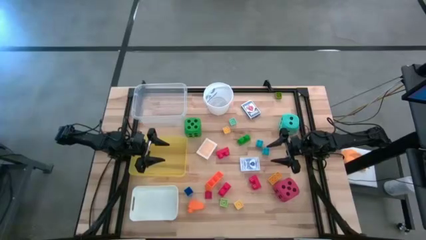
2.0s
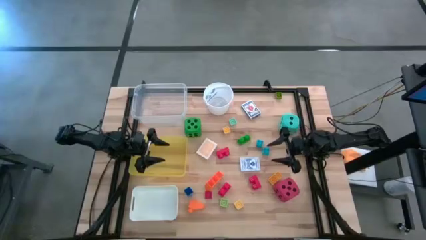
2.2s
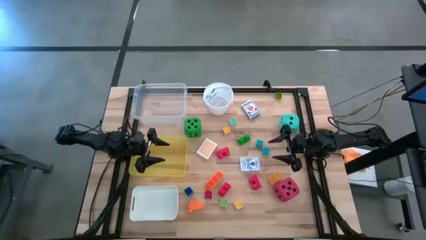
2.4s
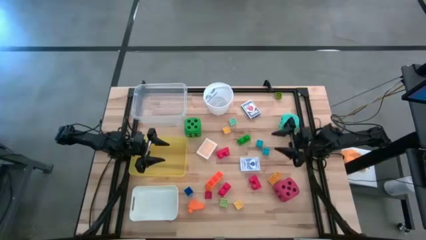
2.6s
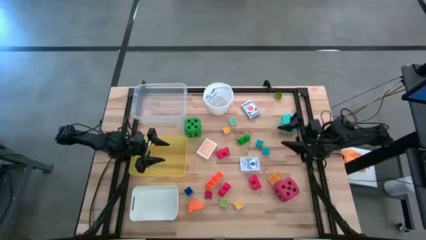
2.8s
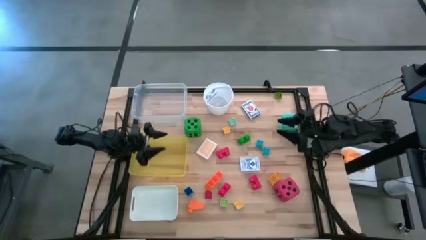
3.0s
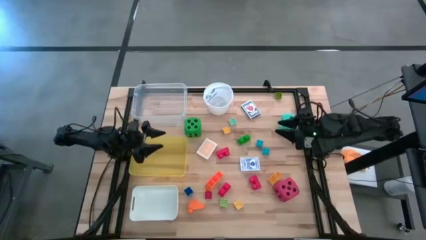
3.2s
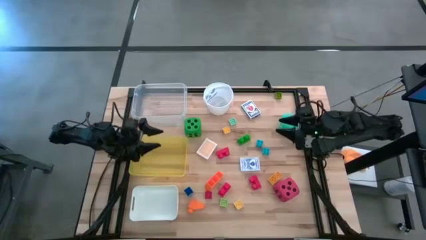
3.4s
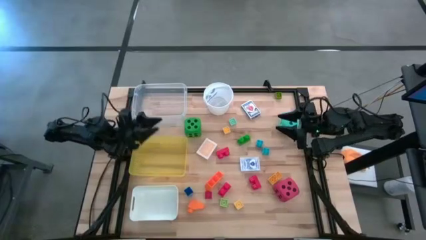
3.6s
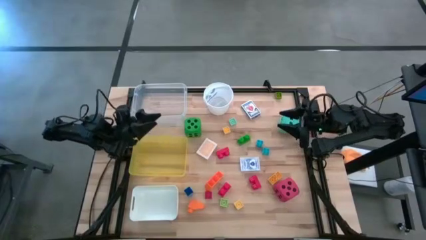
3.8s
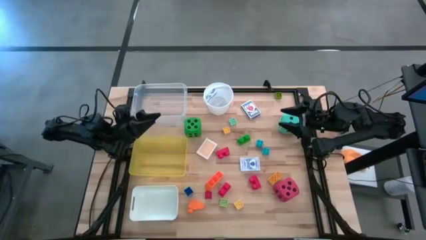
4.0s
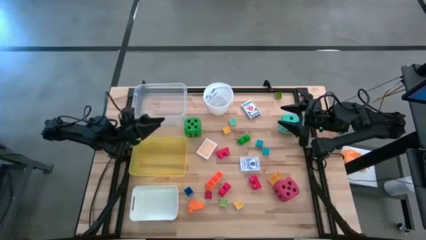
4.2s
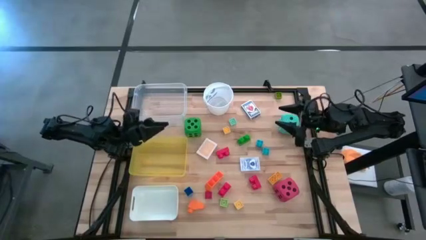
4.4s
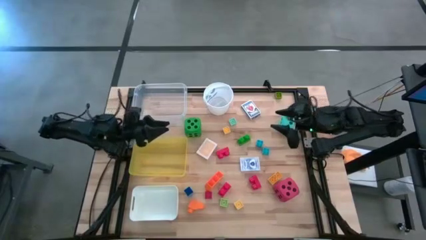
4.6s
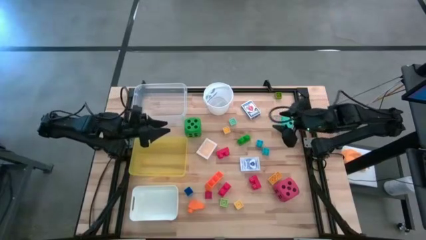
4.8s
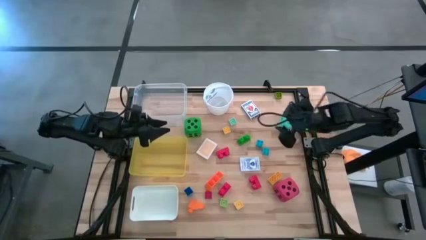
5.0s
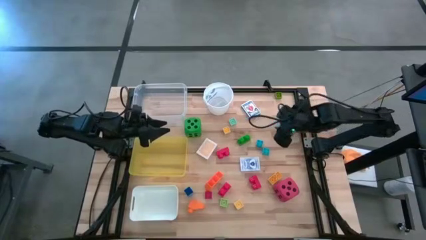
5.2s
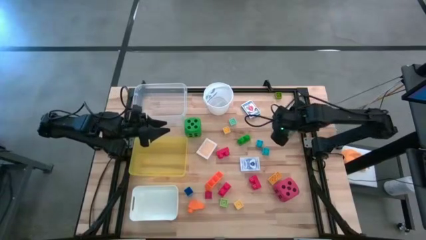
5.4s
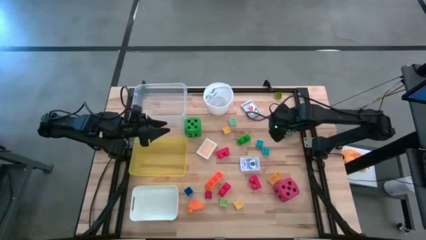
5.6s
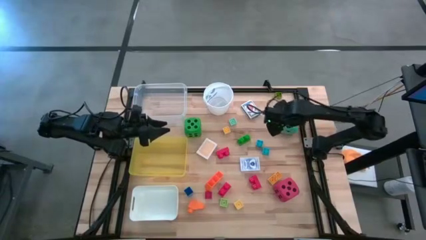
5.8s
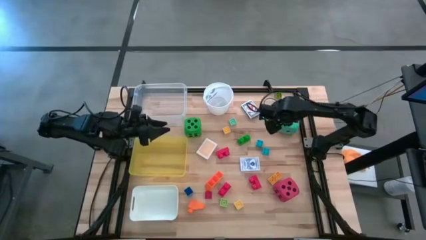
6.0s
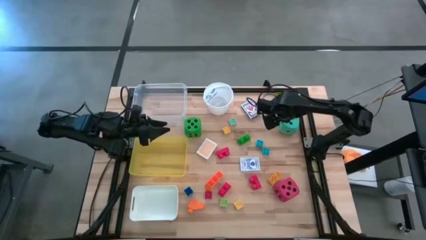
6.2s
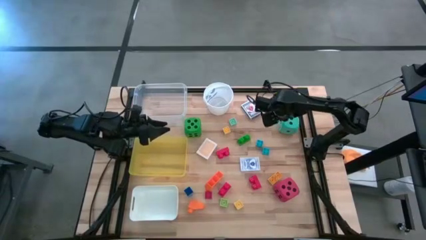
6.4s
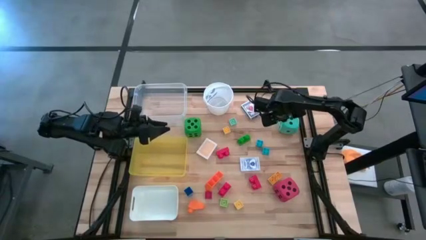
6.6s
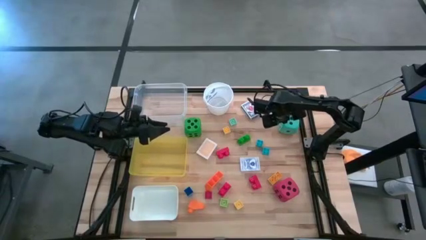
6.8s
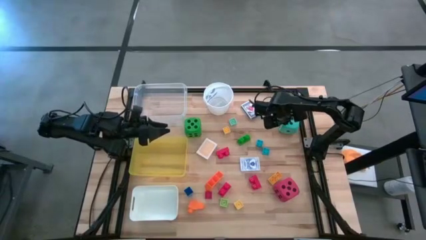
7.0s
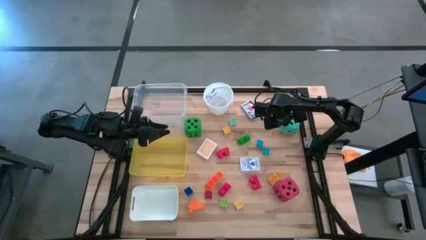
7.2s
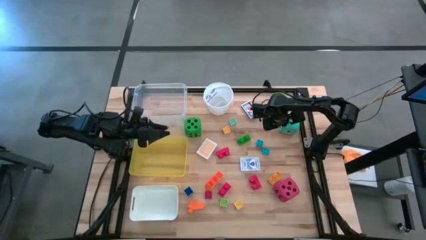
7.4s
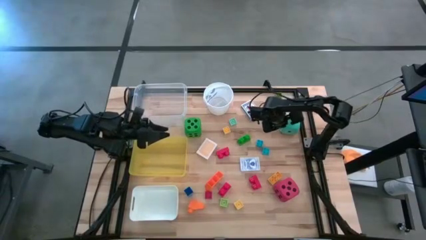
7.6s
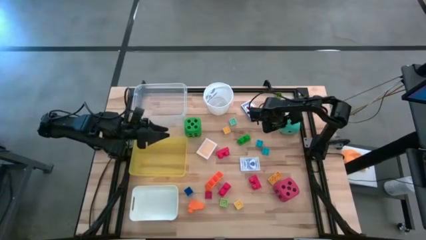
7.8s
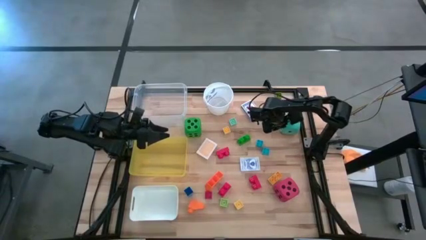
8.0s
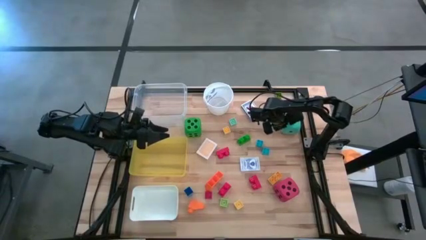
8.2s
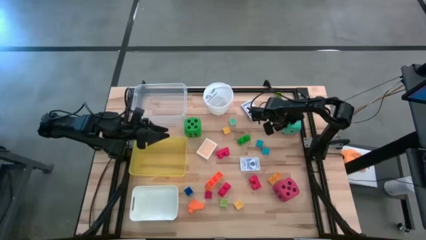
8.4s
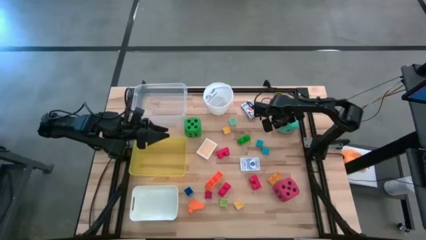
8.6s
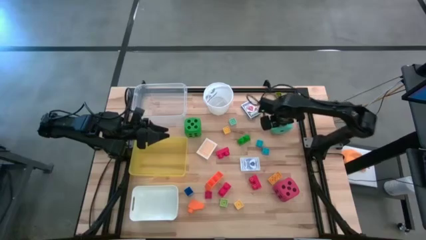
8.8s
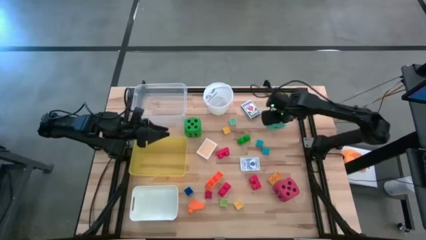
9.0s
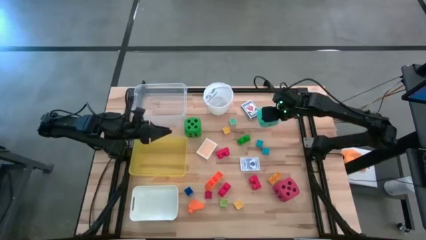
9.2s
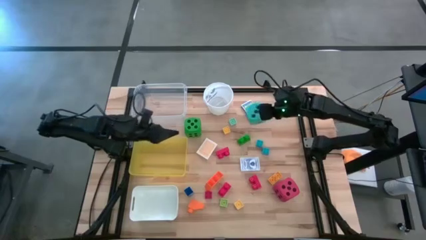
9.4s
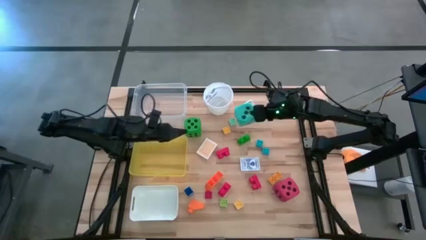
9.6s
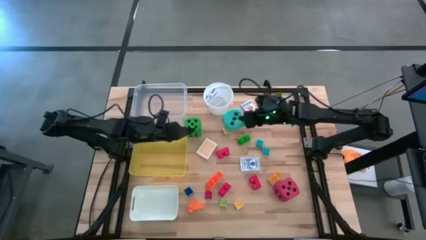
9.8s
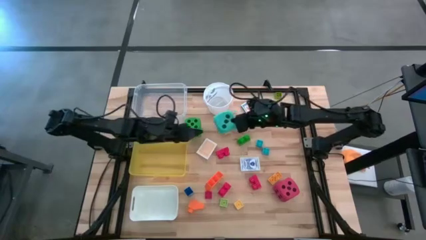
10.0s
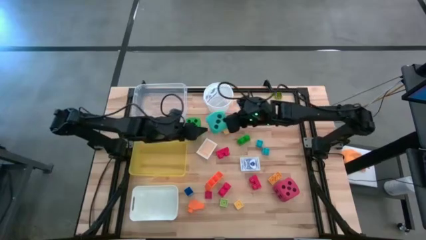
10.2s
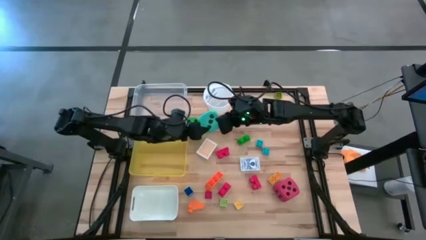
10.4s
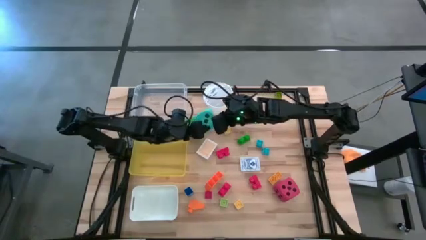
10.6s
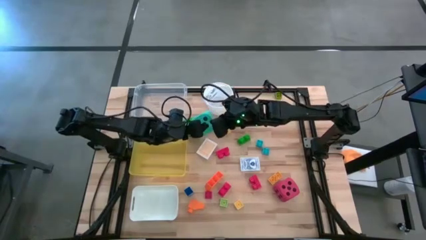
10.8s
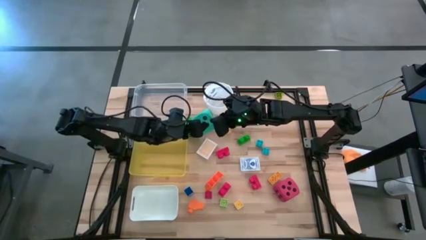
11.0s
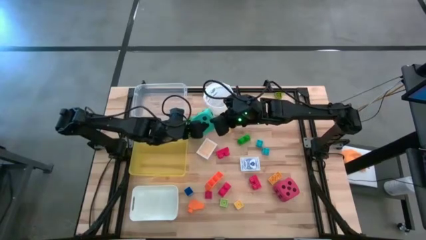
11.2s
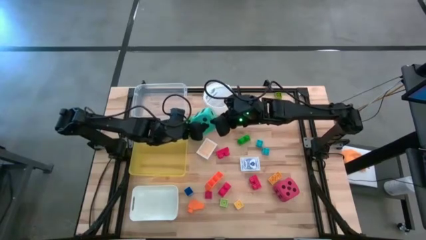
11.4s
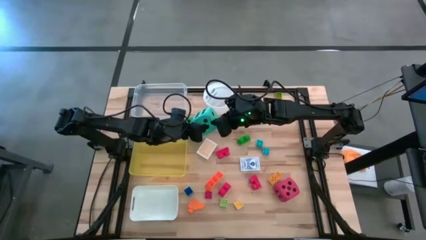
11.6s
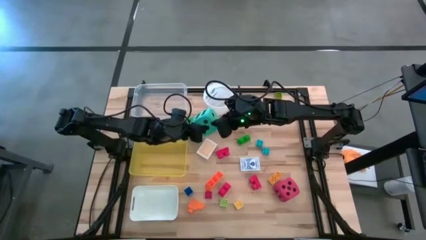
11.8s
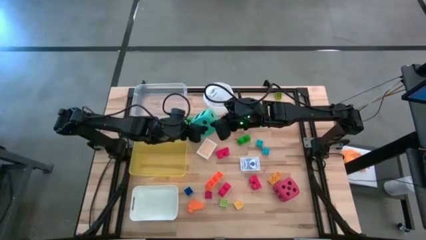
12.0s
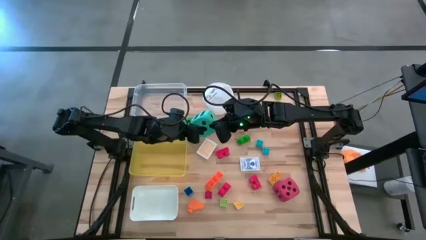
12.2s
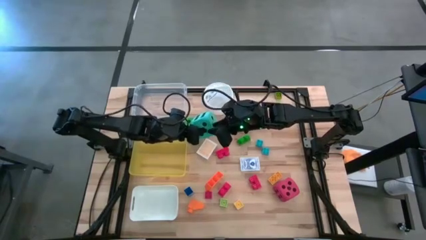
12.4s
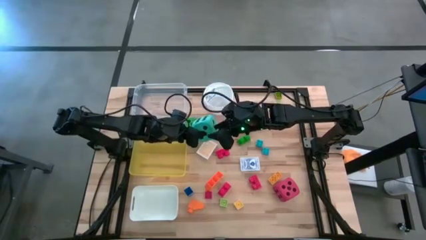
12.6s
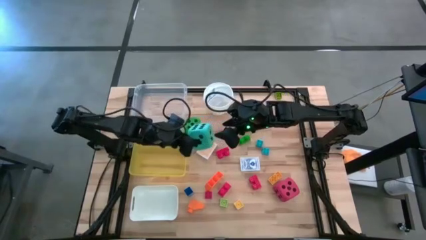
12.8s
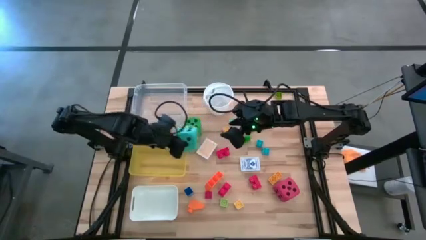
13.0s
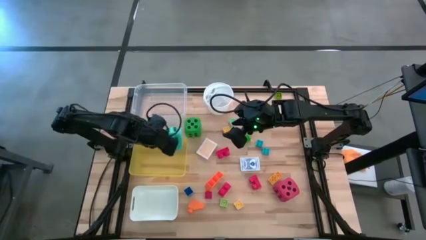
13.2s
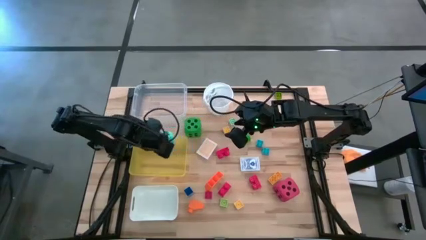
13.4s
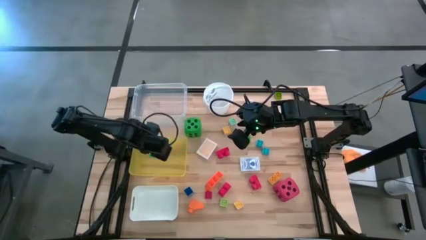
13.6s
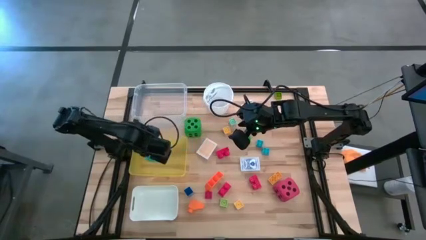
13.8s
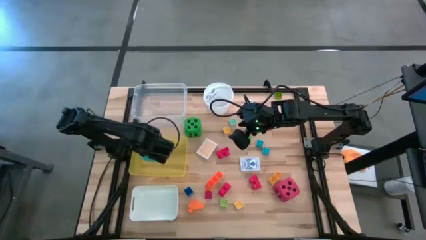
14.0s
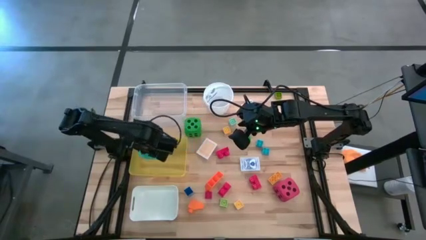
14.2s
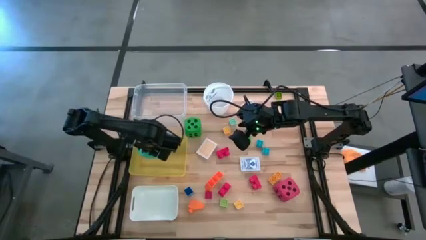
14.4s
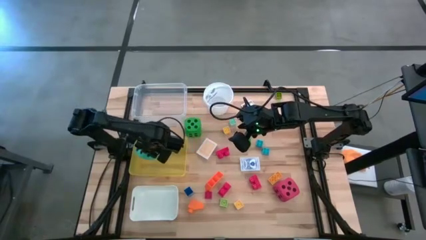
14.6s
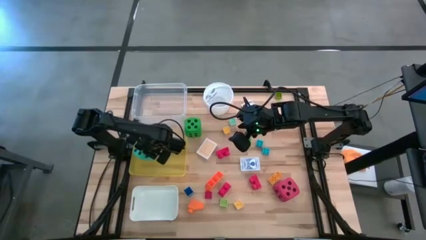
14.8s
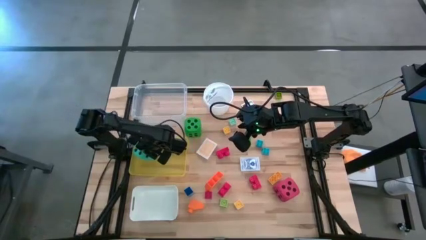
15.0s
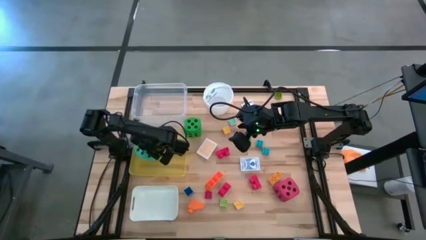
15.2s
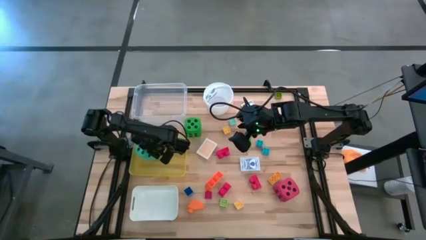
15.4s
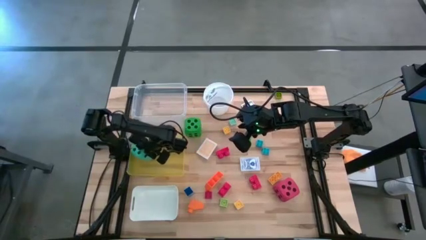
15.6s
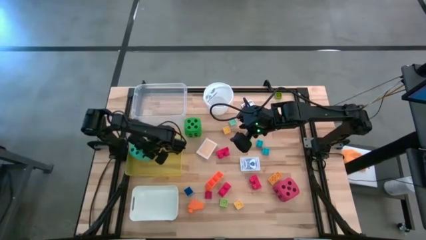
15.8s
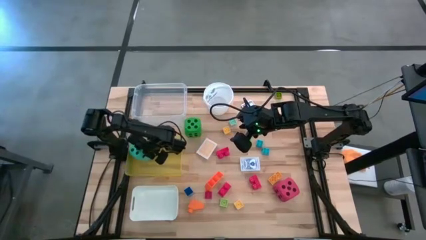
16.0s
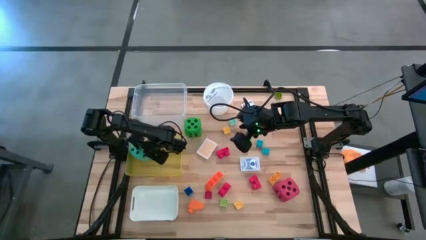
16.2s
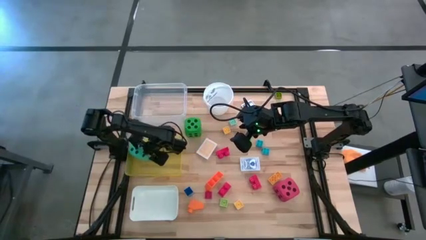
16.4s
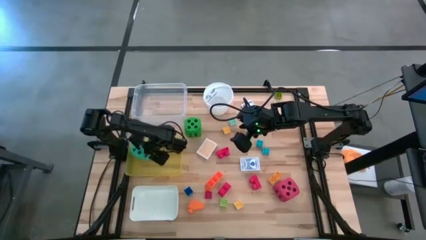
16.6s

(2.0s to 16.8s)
Task: Pick & Place Toys
Put the blue die into the yellow bin
